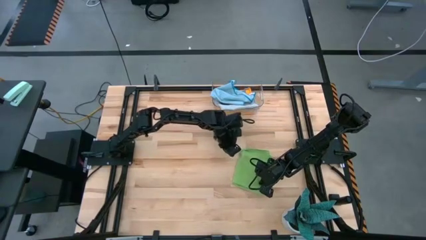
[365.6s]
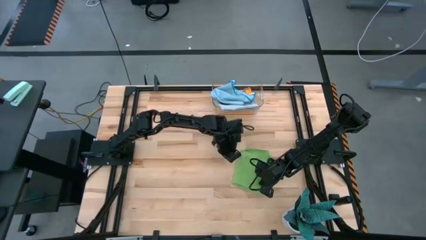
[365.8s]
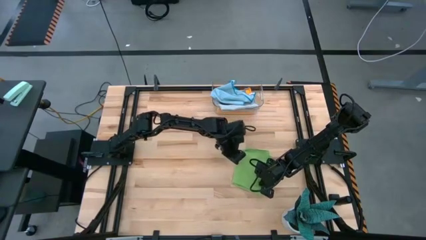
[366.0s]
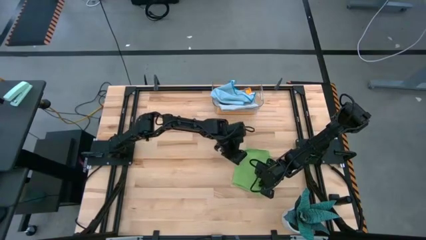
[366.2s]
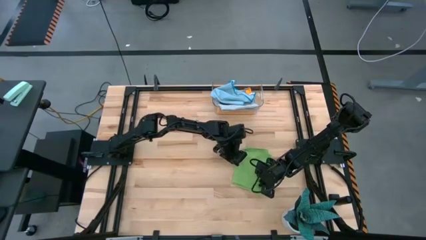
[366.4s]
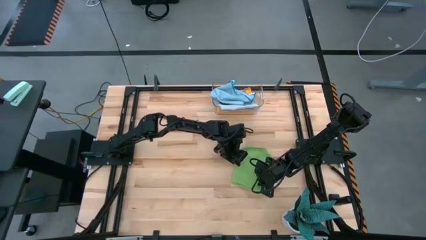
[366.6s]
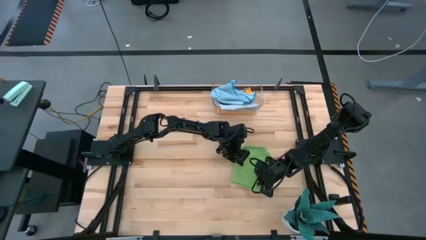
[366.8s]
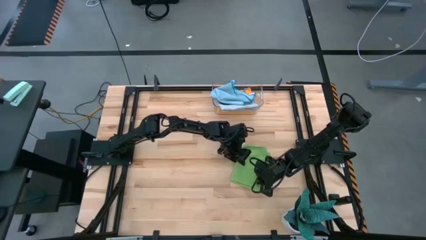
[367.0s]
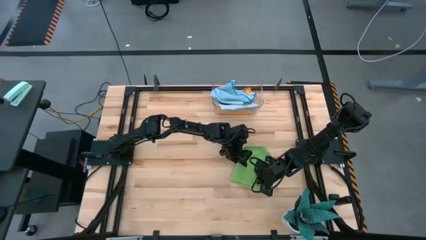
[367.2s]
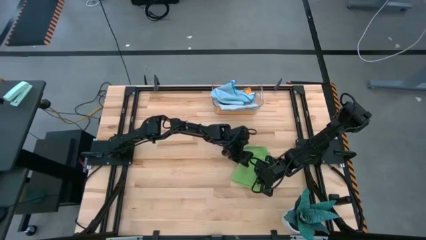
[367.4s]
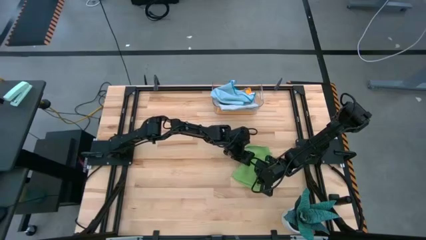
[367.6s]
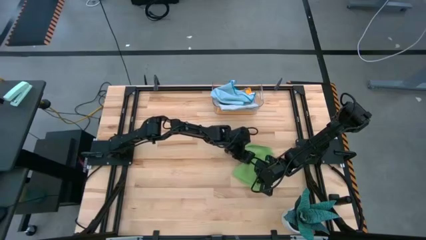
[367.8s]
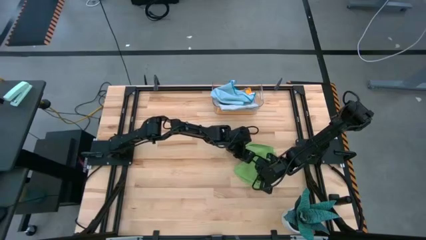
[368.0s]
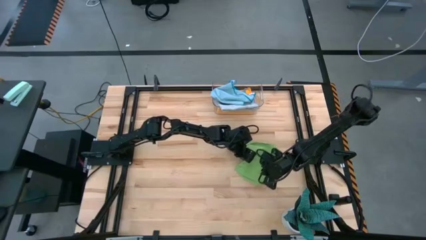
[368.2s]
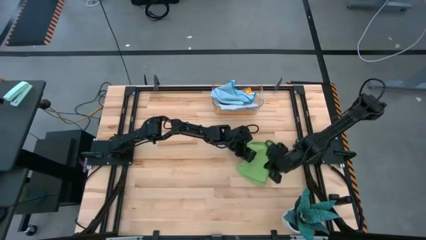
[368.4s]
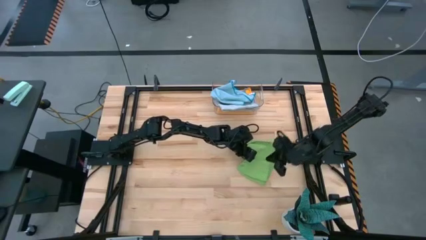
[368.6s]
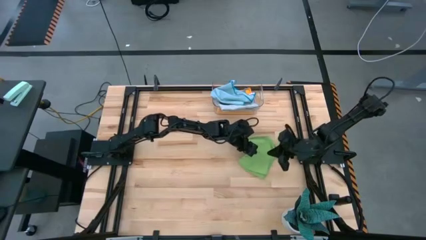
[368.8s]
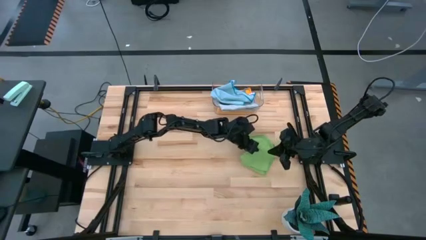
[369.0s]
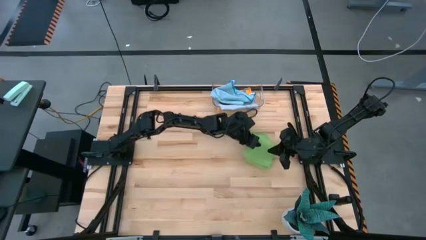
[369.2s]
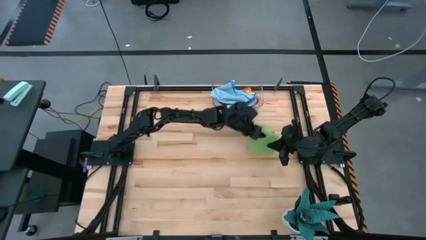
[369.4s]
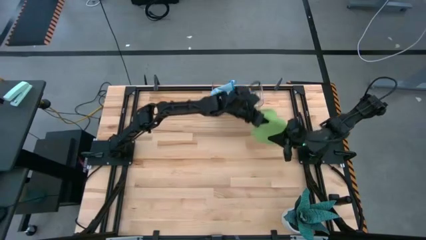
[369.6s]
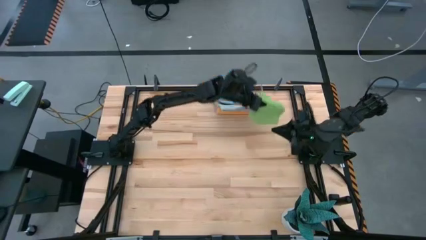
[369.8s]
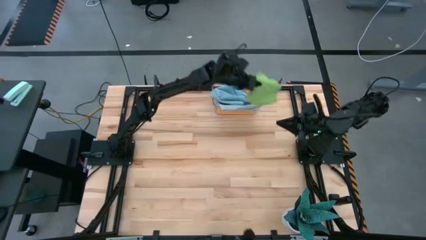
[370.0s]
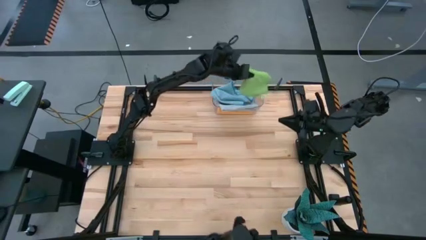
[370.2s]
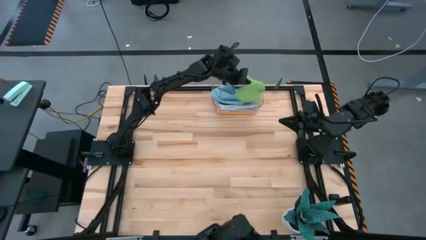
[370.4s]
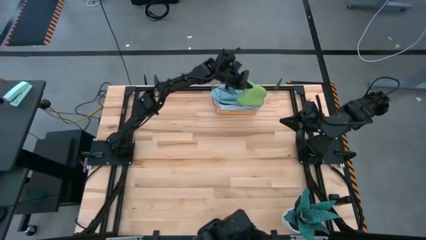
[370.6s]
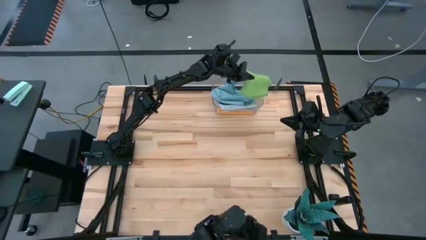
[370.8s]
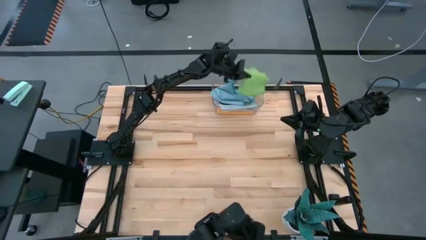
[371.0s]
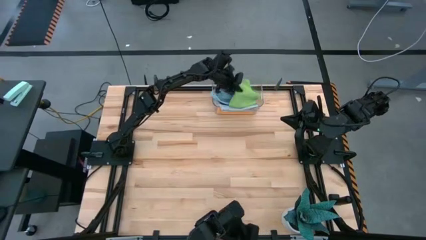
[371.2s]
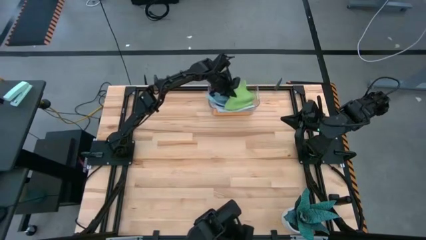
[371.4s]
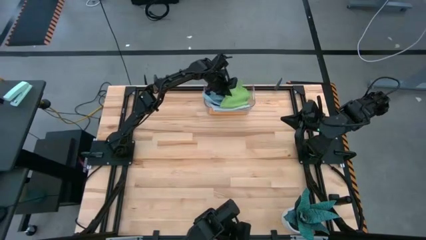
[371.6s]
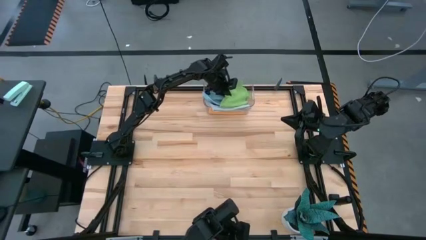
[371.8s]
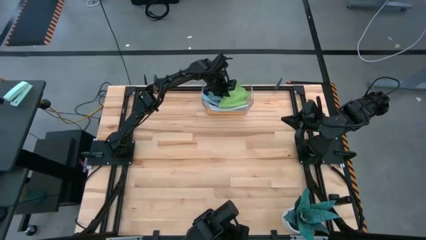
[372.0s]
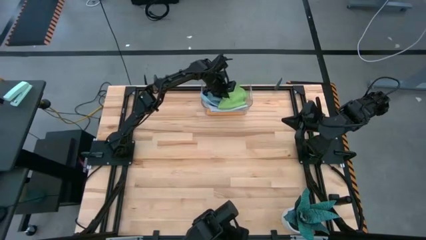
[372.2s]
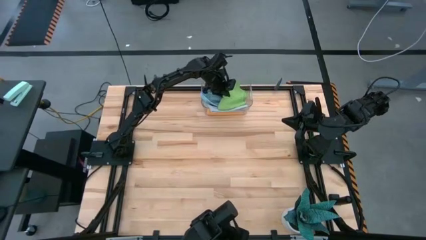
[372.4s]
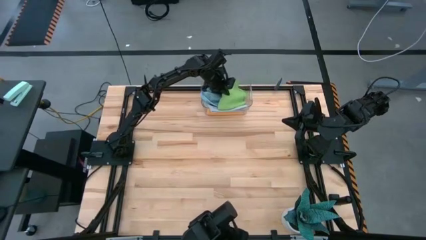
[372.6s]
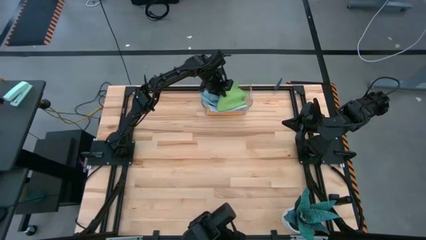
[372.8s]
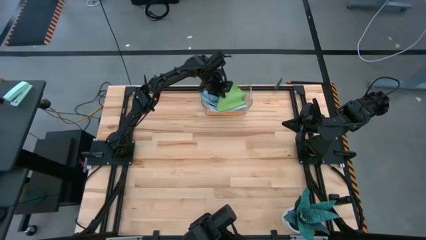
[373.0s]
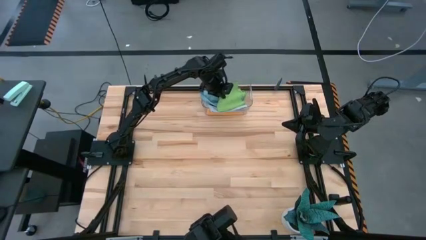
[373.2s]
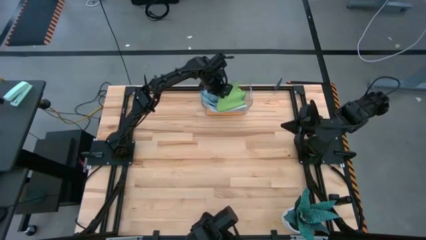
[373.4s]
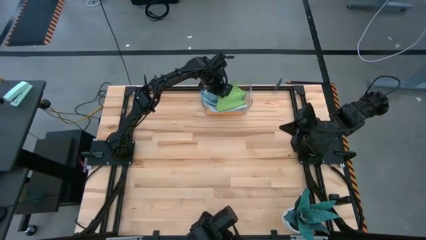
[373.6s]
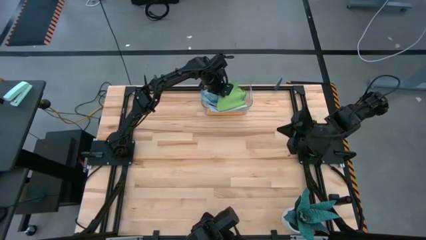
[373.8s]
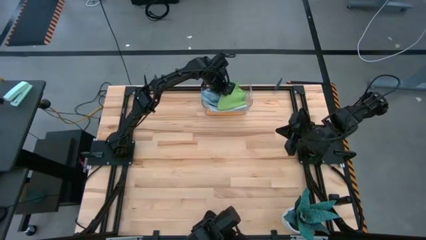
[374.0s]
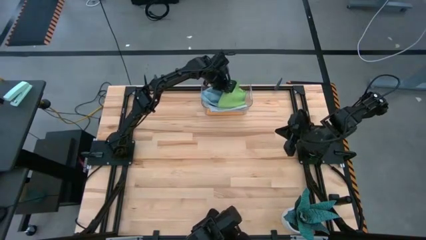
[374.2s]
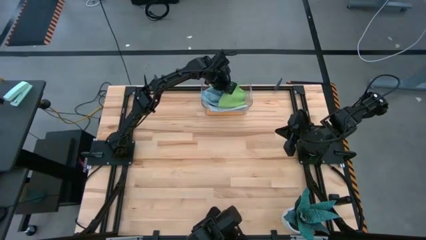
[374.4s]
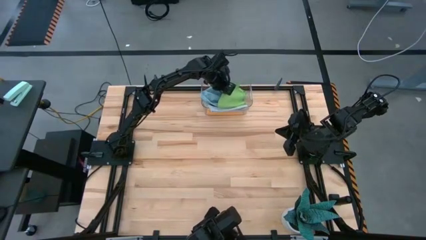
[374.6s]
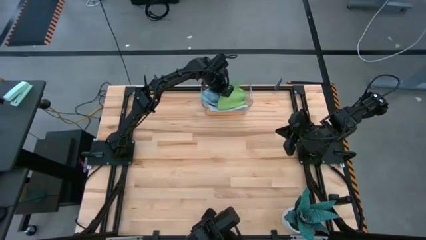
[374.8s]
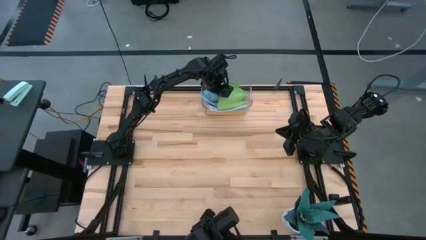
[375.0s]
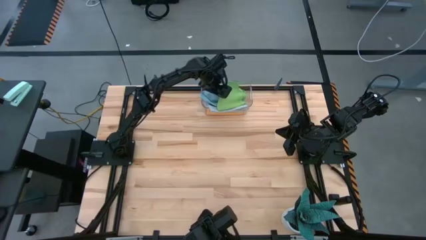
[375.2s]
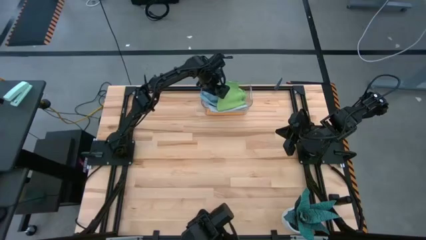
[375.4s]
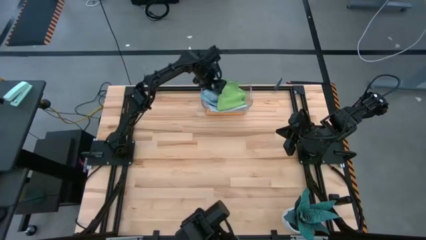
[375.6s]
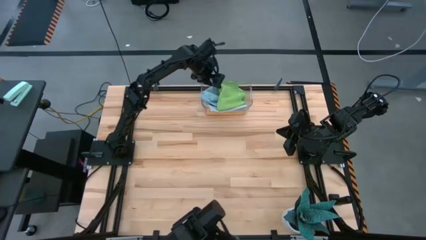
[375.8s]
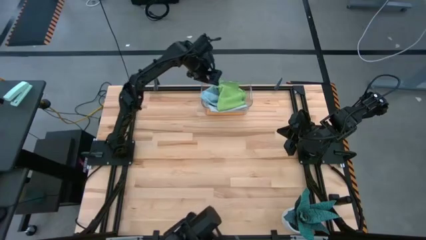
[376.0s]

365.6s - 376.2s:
Task: Fold microfiber towels
Put the green microfiber cloth into the transparent bin

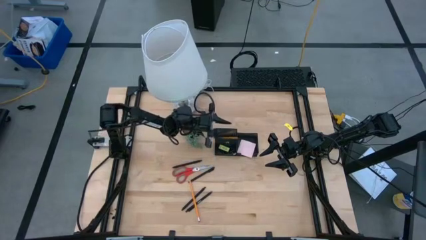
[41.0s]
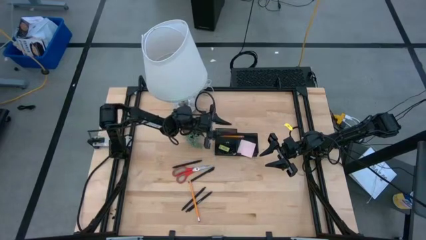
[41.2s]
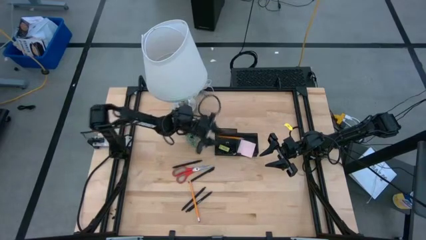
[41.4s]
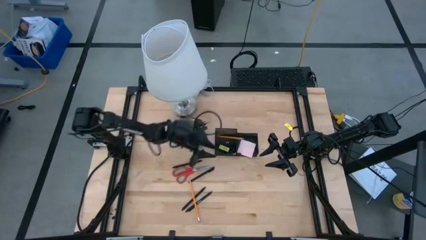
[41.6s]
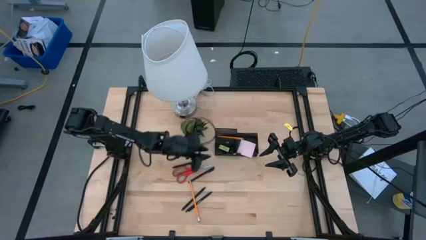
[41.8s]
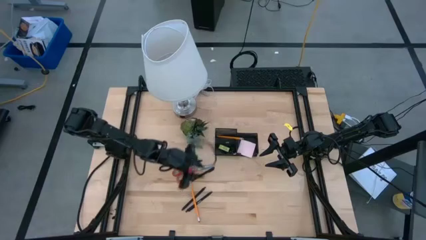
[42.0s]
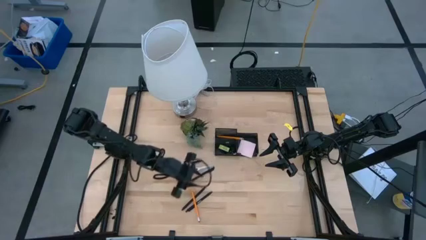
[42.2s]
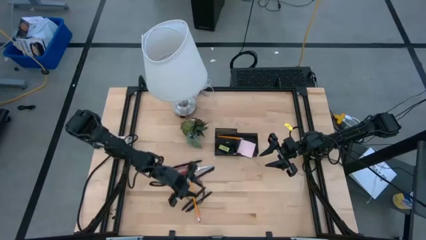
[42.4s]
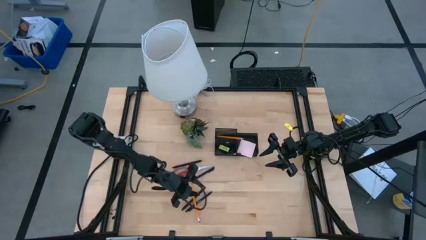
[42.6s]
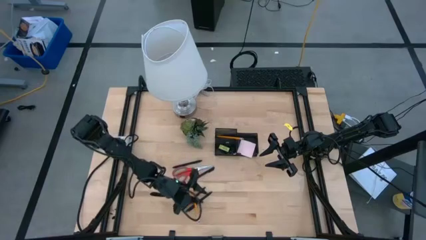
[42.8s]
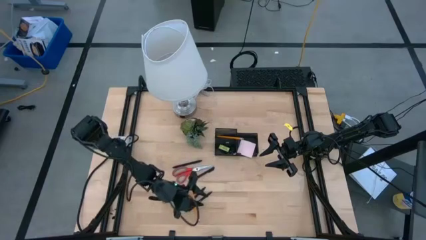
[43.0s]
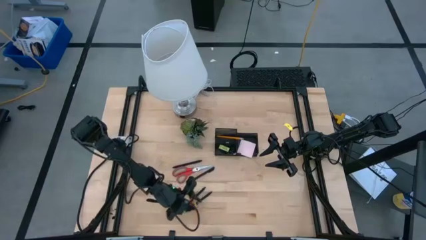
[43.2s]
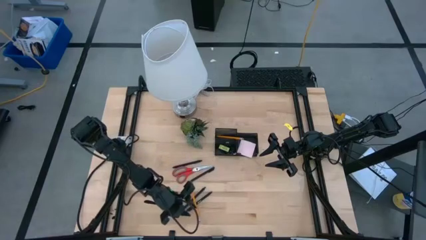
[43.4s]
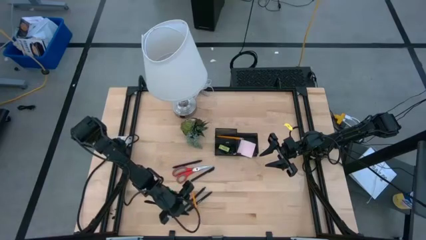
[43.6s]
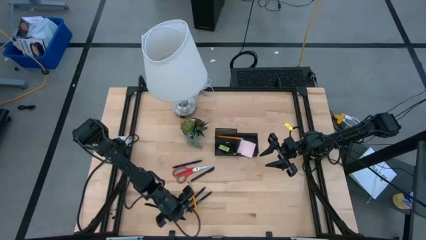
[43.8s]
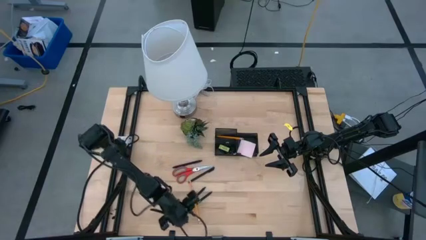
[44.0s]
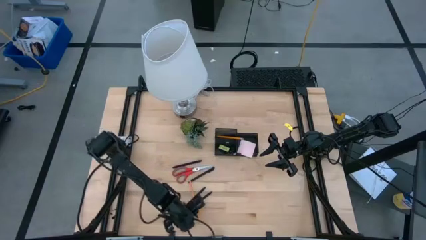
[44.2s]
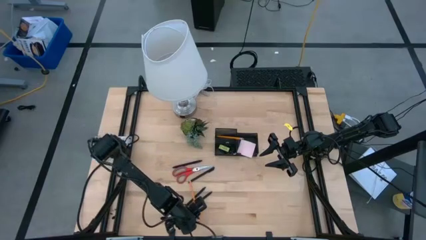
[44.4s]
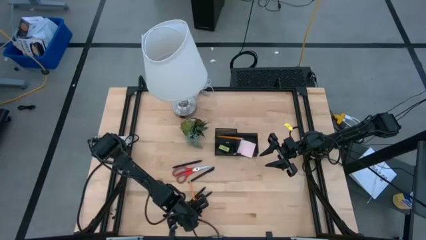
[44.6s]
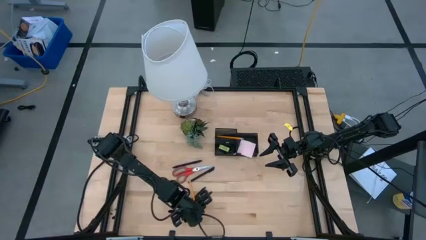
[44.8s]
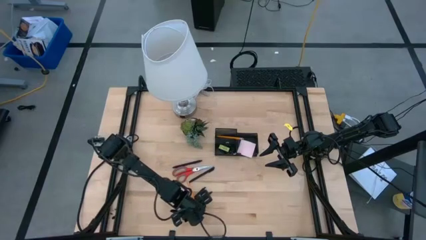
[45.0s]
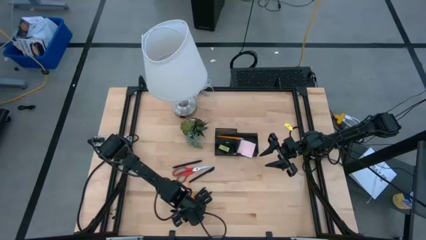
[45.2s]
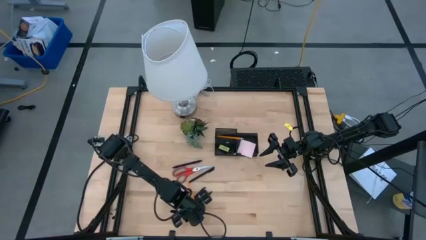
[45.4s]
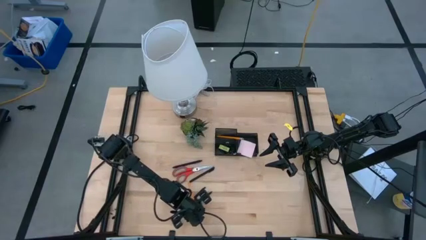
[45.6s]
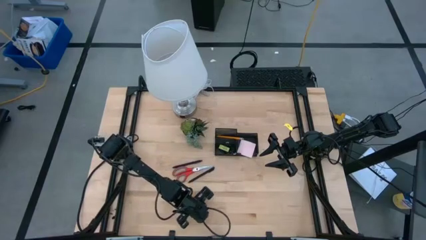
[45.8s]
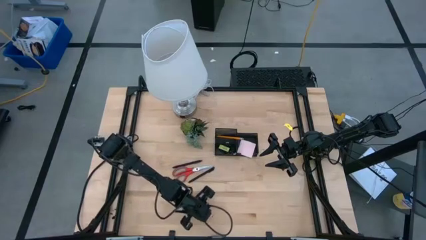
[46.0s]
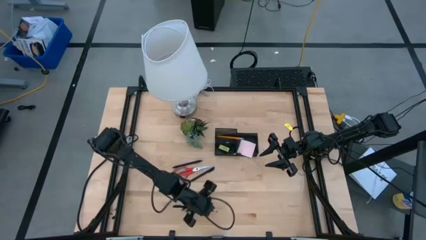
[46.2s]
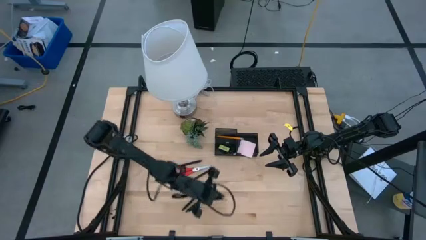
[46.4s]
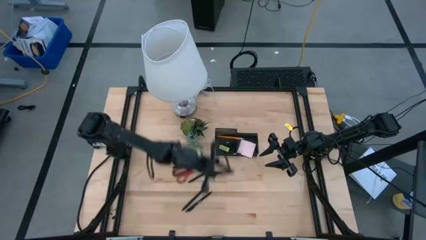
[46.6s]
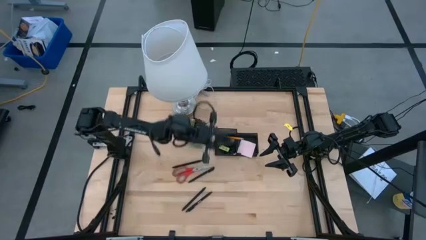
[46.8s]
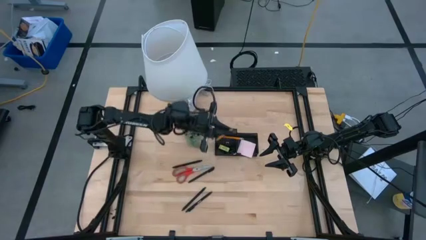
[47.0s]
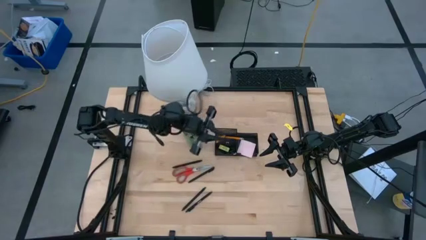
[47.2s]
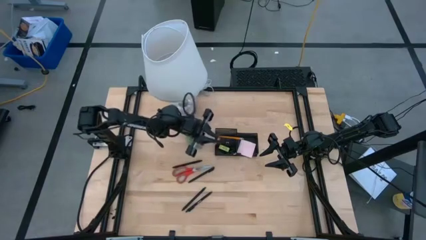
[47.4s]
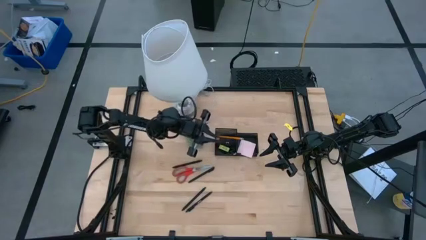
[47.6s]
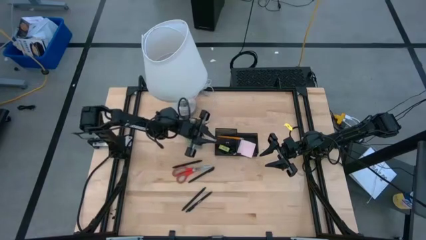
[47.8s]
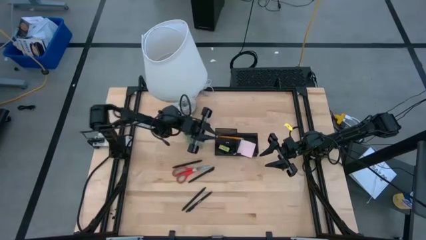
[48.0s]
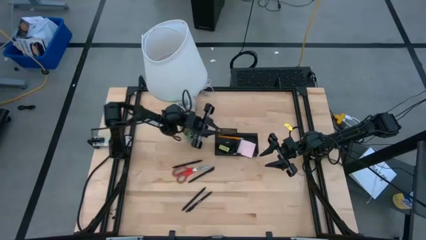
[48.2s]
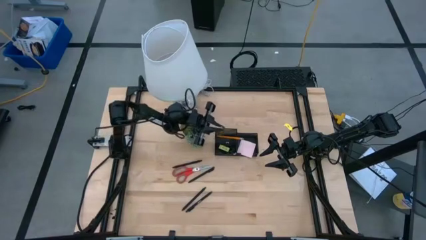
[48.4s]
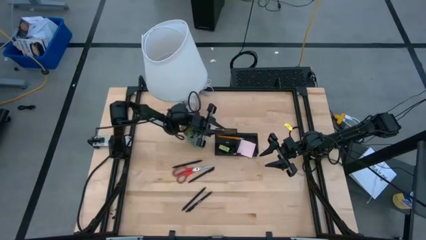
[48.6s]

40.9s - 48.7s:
Task: Pick and place office supplies into organizer
Put the orange pencil into the desk organizer
